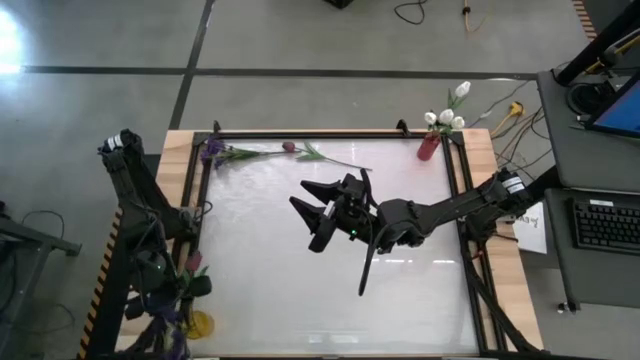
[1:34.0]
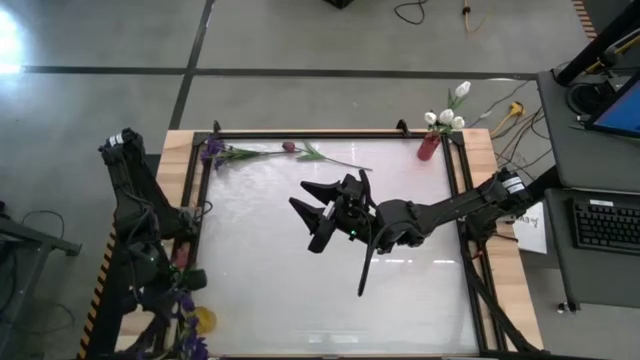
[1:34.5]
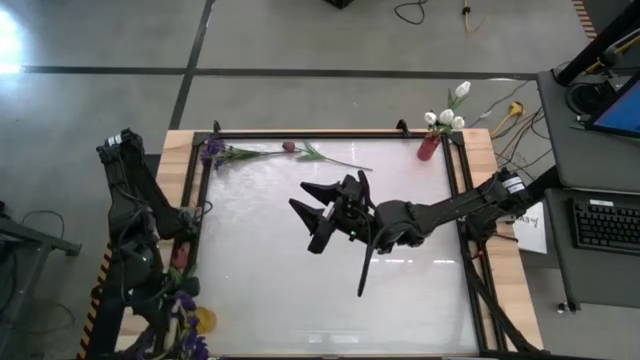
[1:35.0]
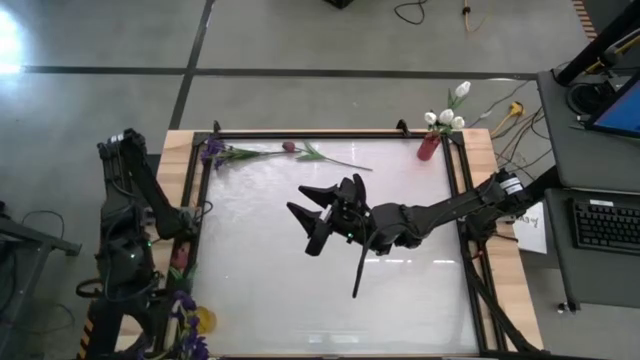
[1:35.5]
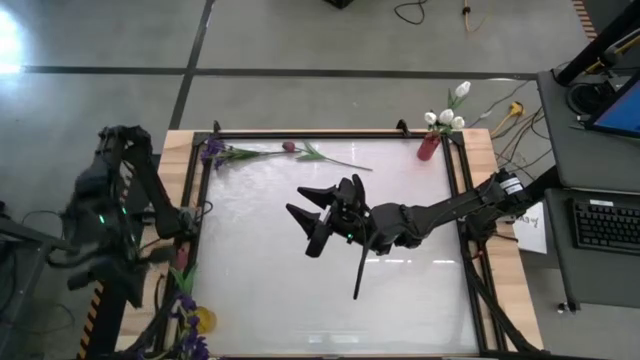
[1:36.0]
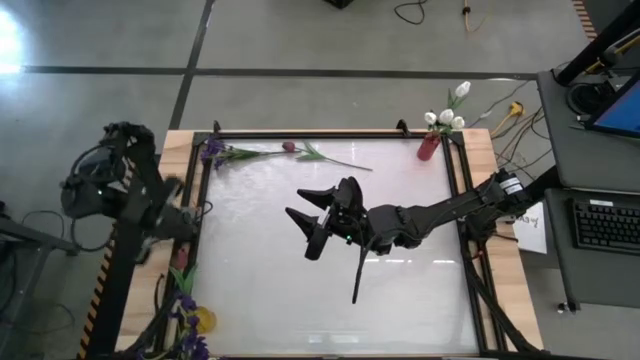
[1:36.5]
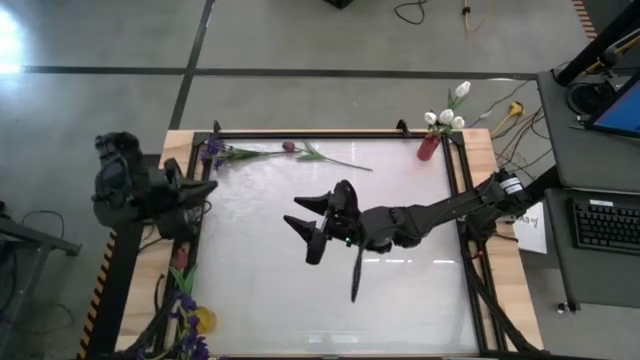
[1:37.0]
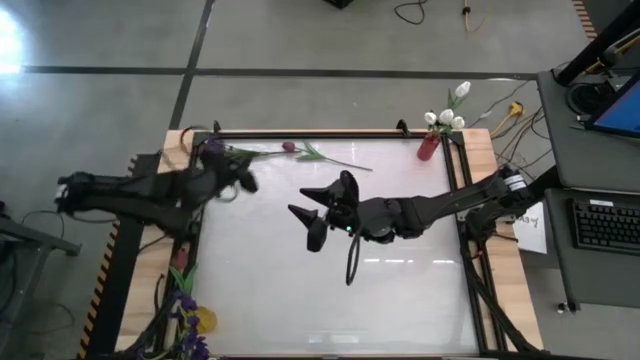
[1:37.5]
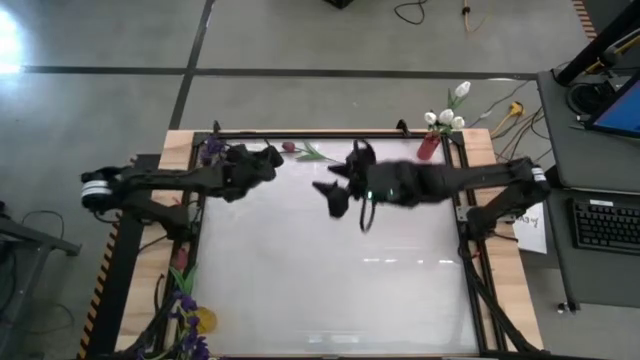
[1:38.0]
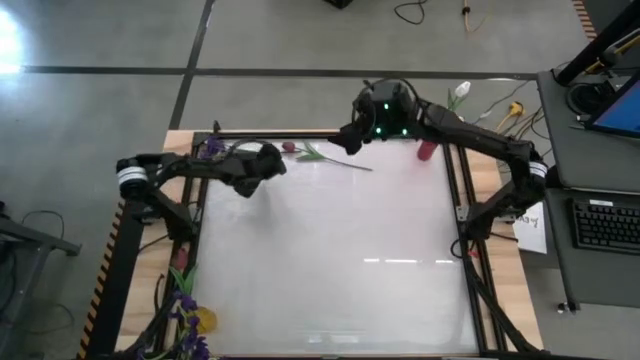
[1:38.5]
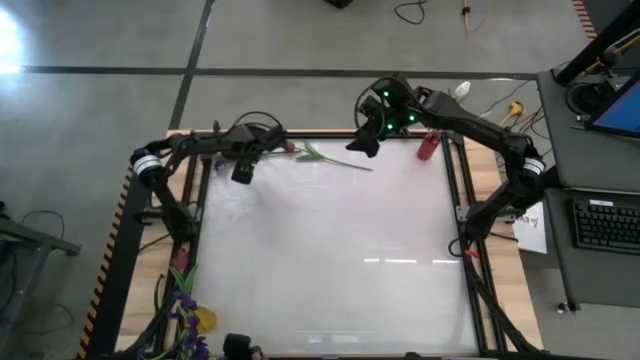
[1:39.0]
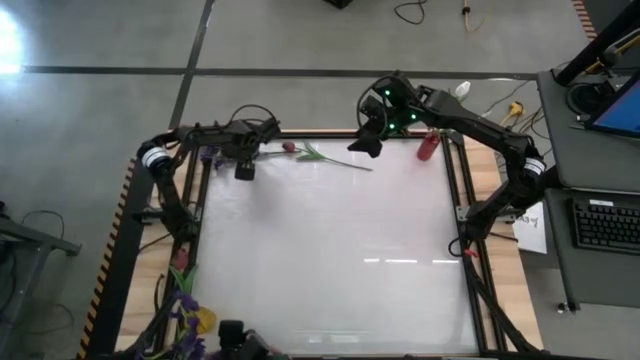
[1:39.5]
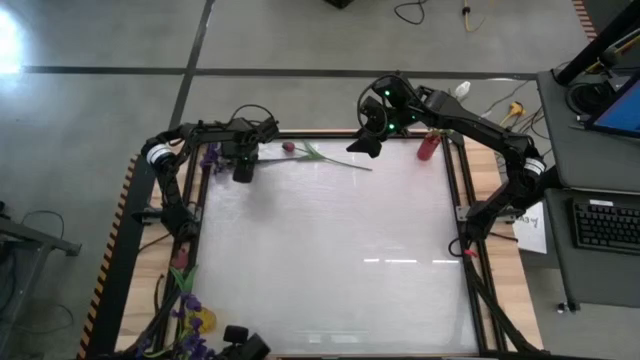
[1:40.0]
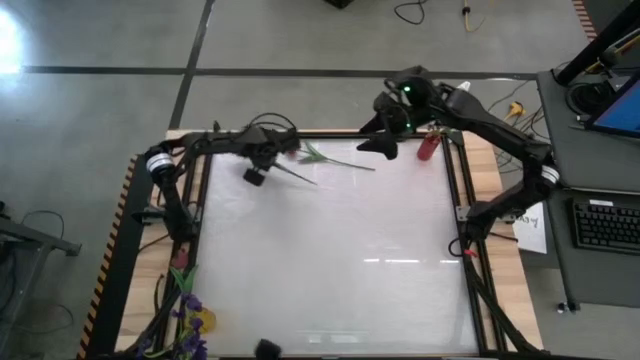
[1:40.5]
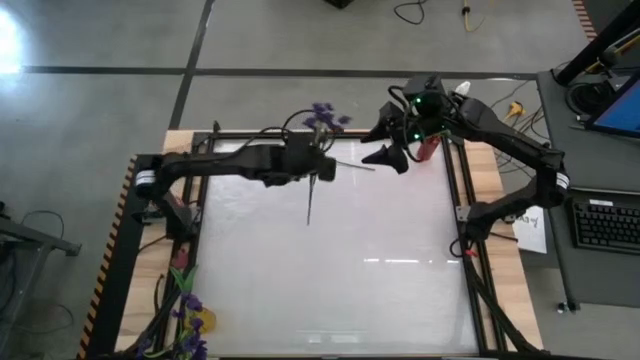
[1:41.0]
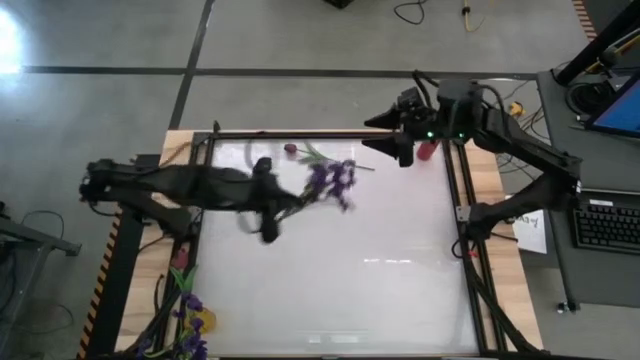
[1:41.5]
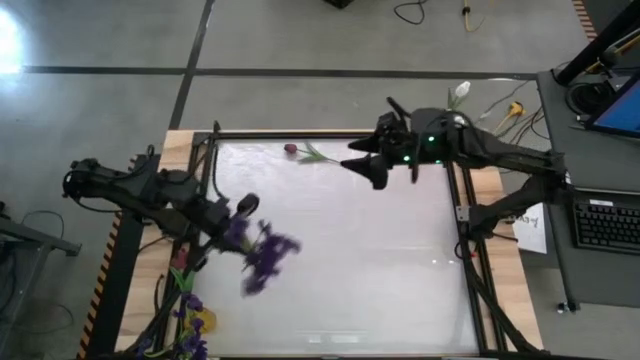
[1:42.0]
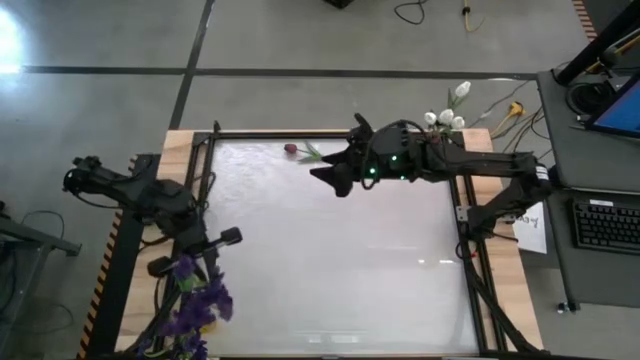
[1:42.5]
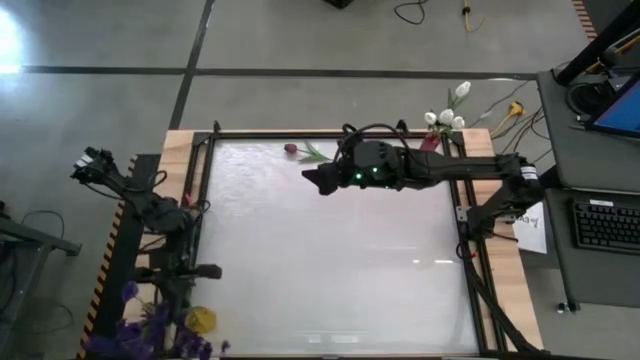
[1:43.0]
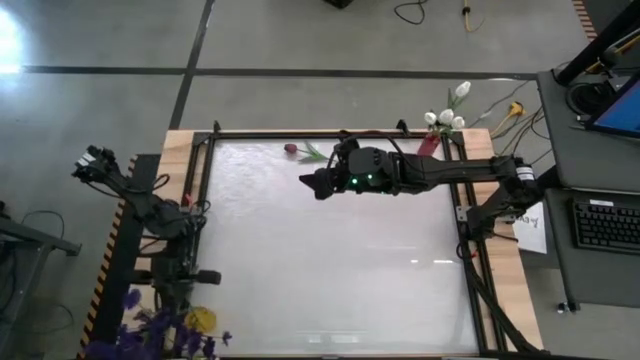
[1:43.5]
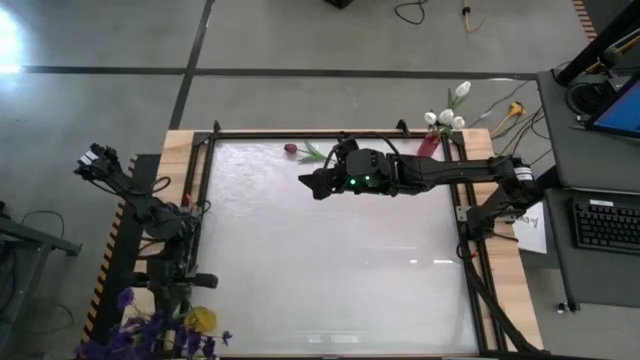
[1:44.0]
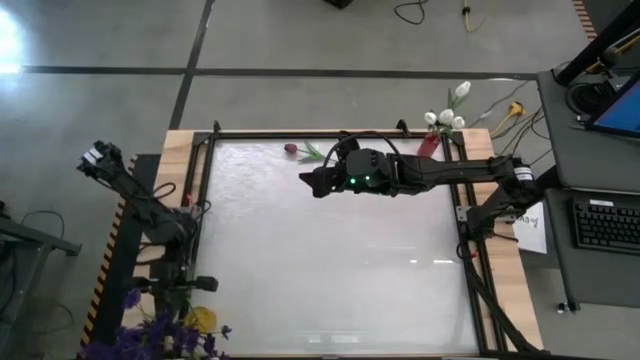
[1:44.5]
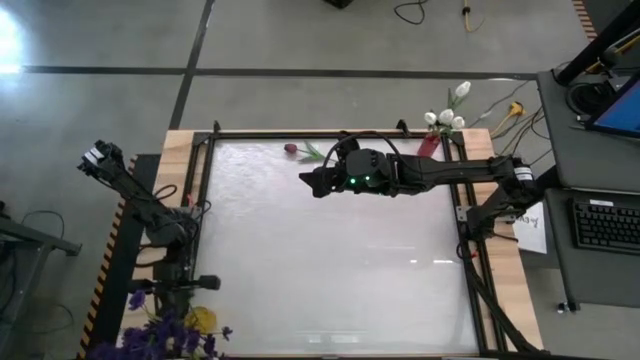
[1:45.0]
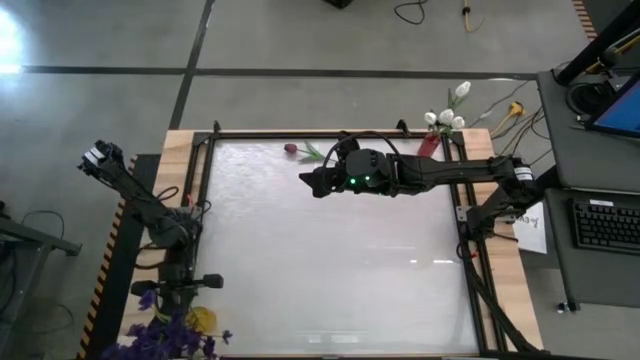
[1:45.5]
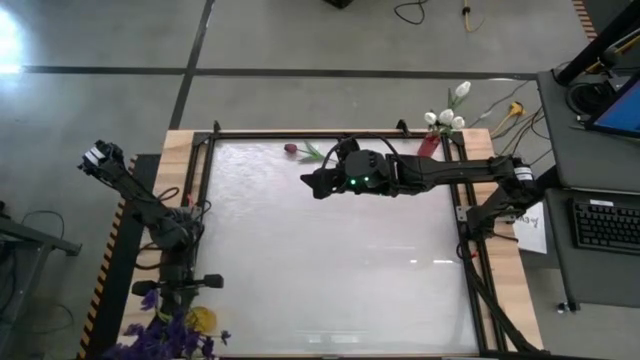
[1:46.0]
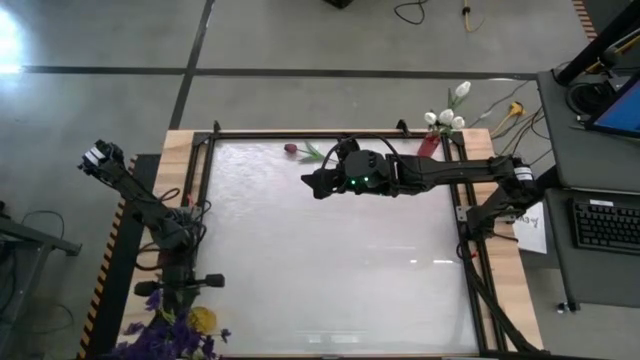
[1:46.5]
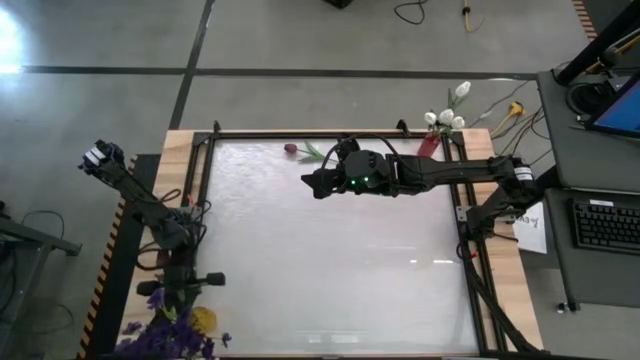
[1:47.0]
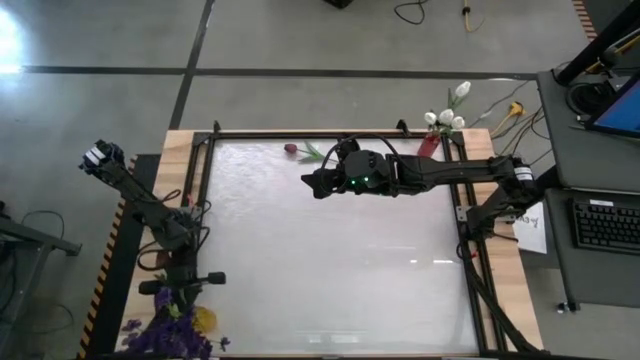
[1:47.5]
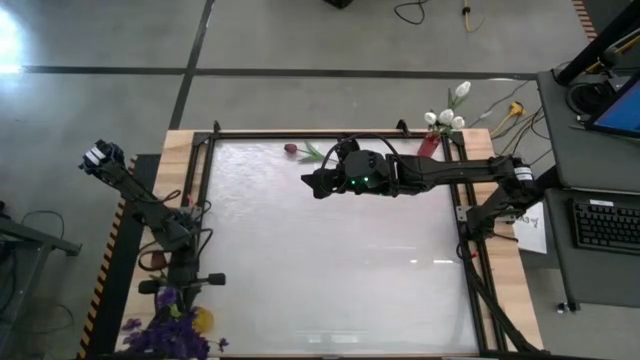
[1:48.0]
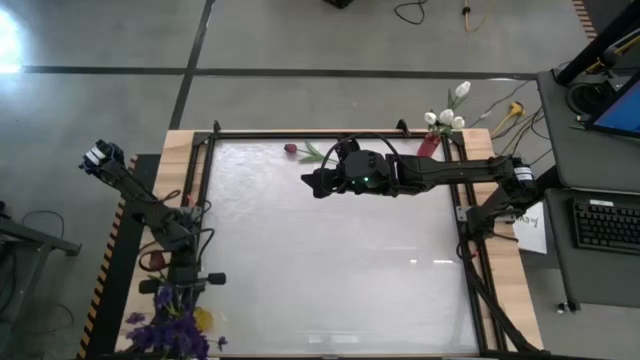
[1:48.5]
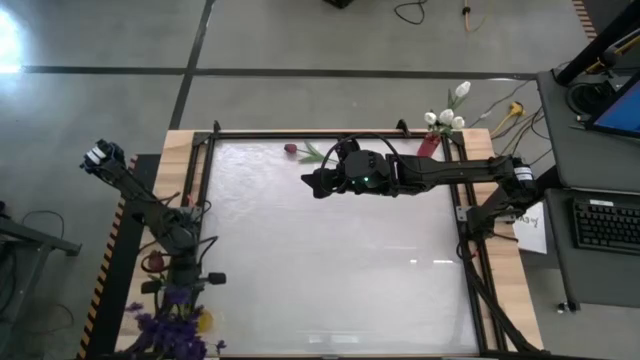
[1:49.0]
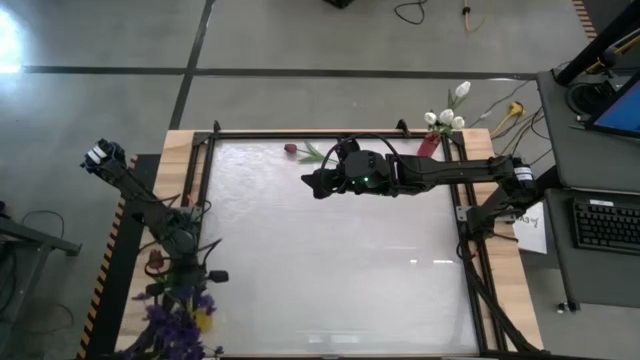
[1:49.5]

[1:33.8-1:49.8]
Task: Sort flowers into vase by color
Put the purple flowers into the yellow flower vase

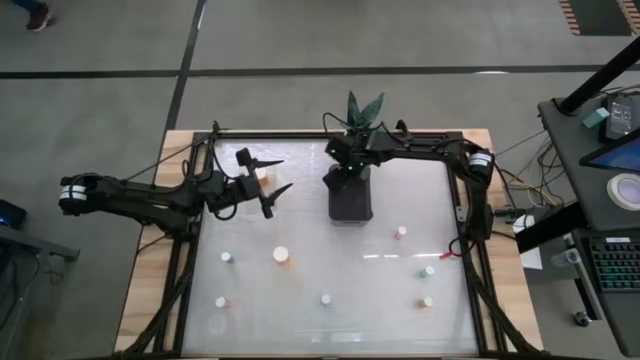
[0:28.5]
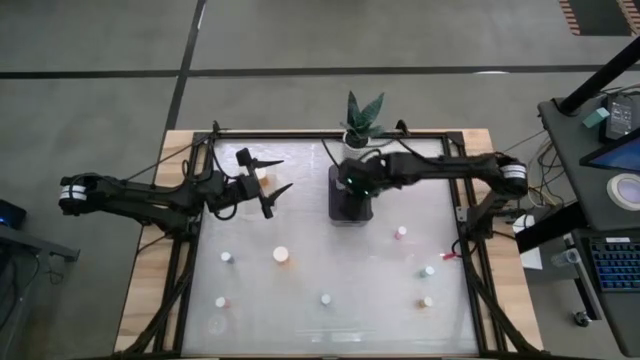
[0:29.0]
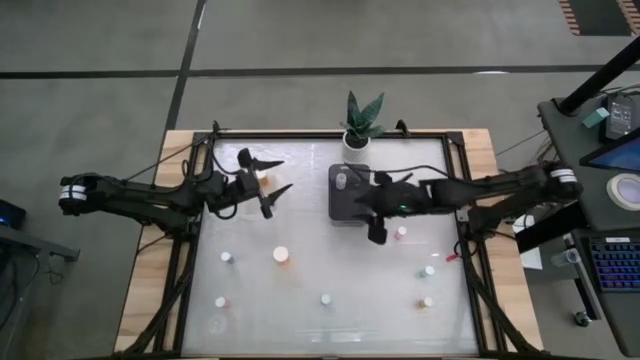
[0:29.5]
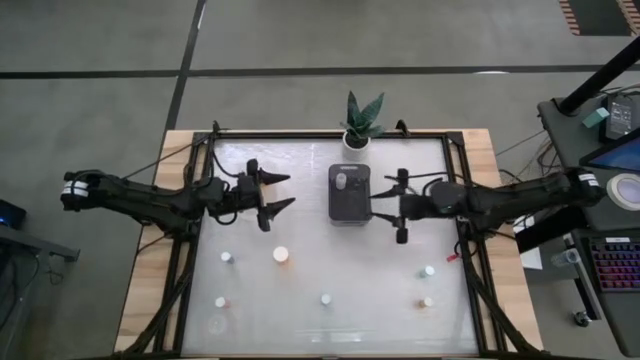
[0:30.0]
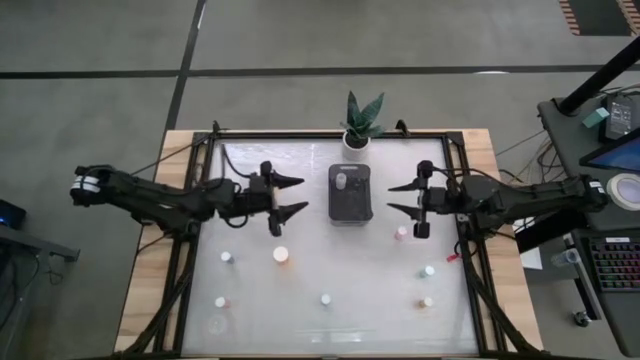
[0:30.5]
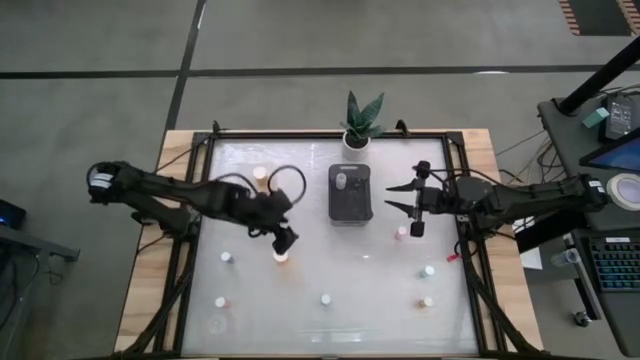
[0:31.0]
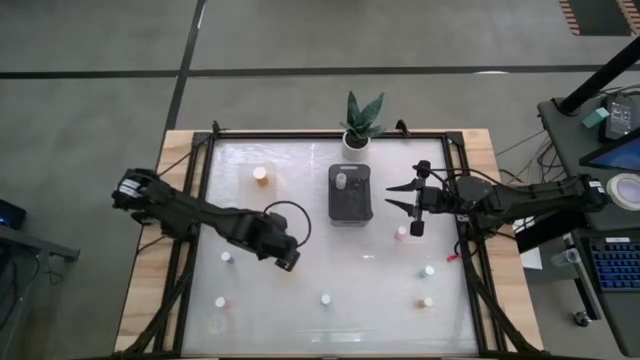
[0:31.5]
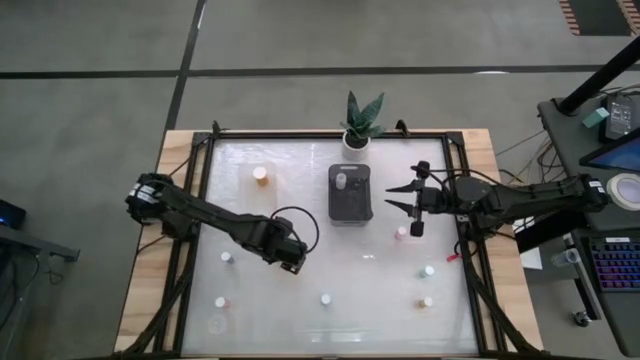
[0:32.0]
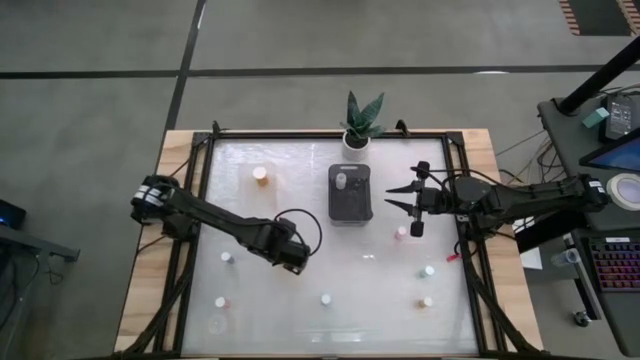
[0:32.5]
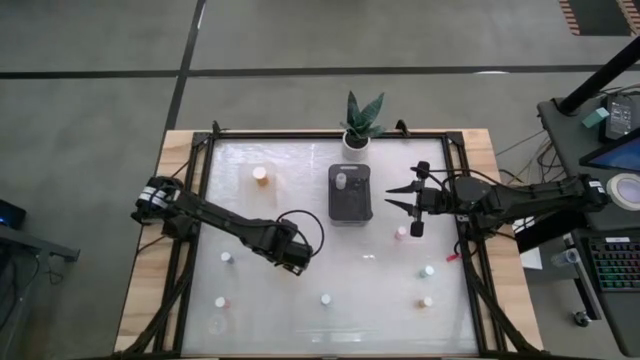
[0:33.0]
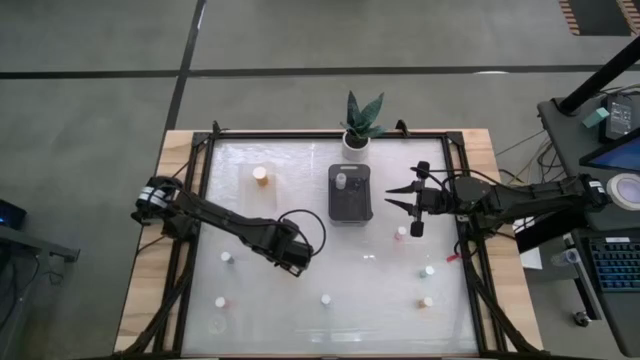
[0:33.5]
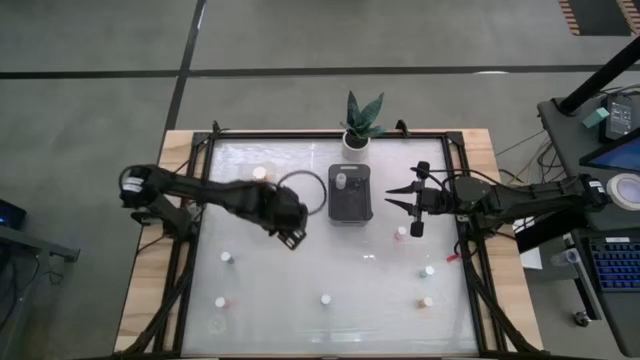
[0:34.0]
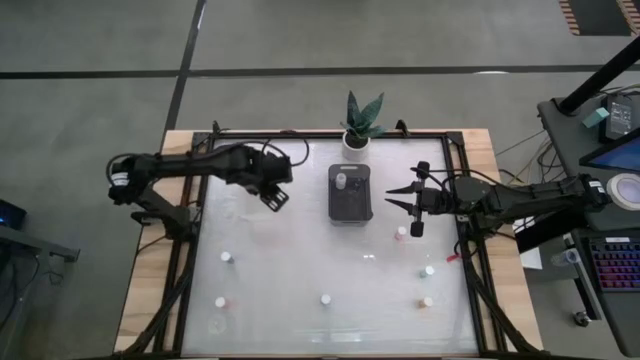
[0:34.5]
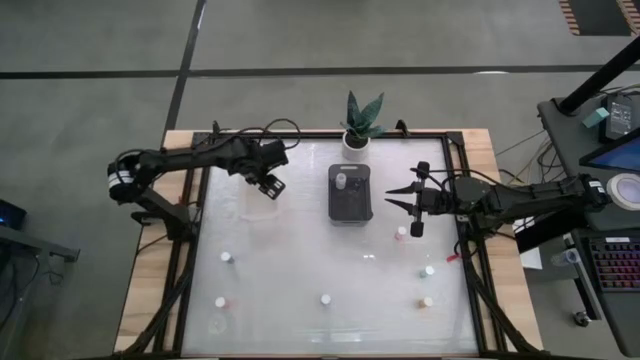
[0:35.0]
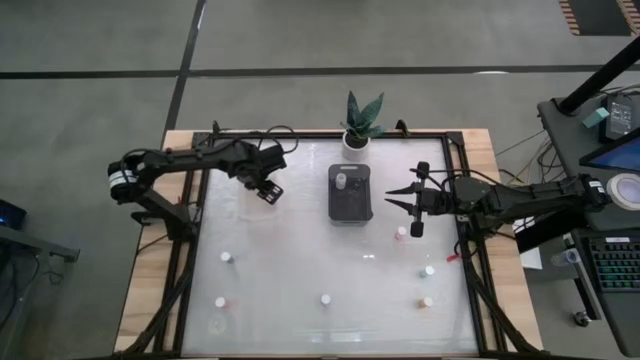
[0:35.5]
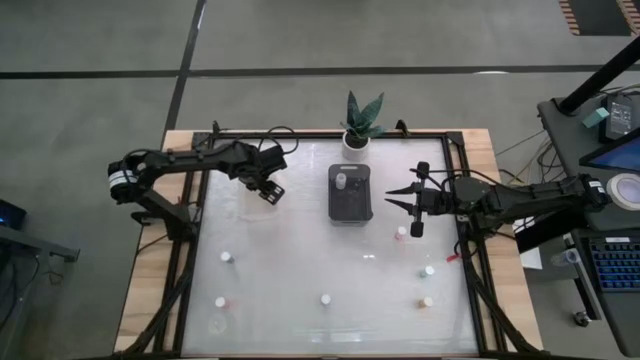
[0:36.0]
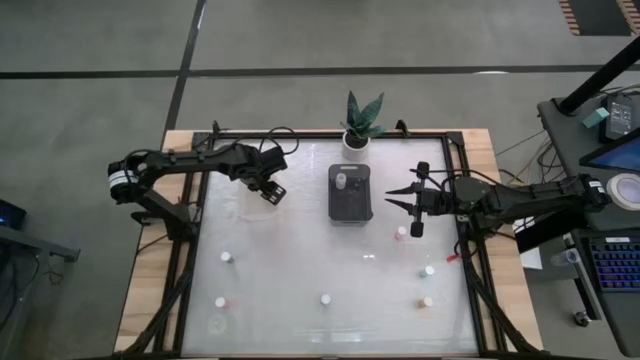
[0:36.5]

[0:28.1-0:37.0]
Task: Pick and place medicine bottles into bin by pill shape (circle, oval)
Put the yellow pill bottle into the transparent bin
